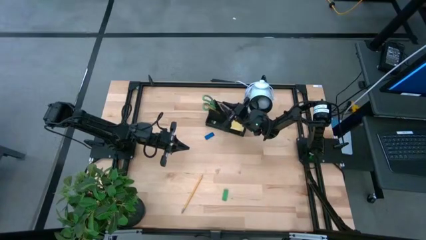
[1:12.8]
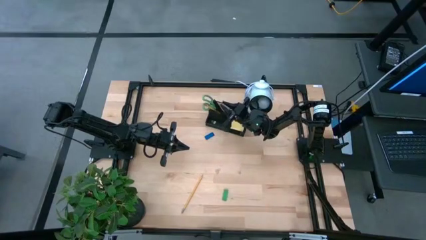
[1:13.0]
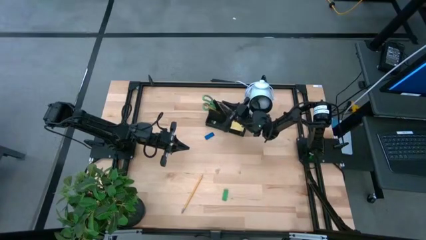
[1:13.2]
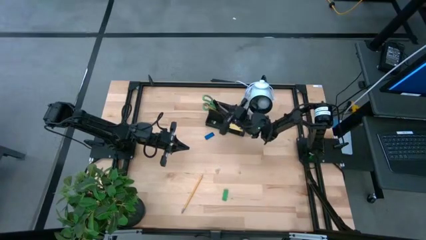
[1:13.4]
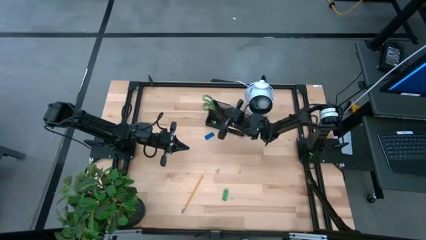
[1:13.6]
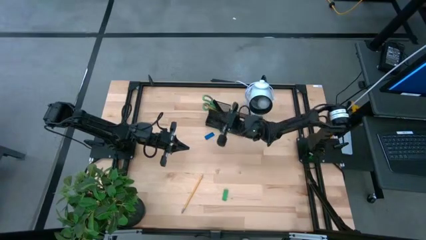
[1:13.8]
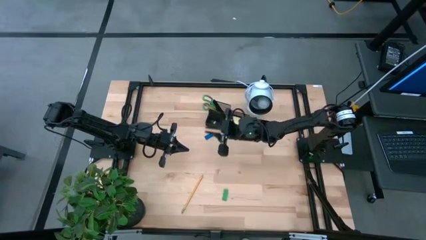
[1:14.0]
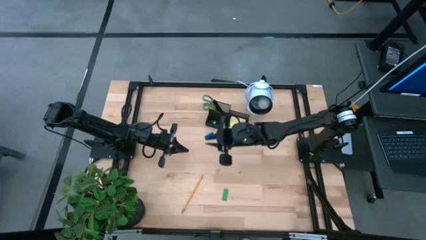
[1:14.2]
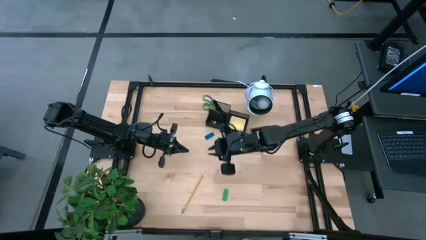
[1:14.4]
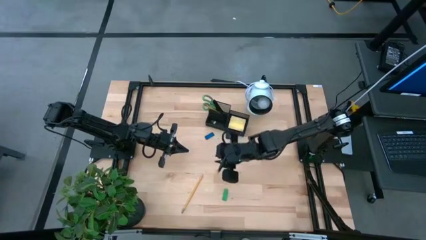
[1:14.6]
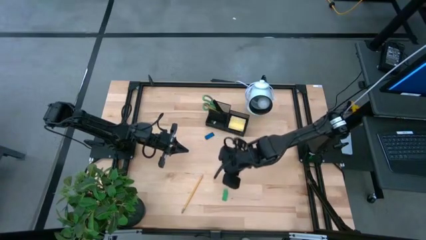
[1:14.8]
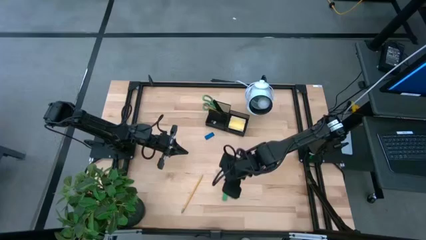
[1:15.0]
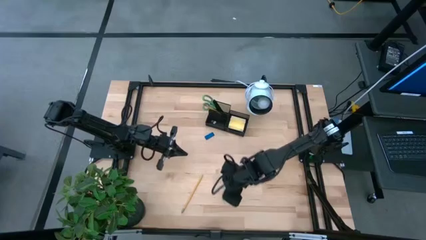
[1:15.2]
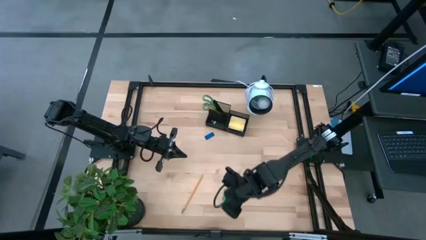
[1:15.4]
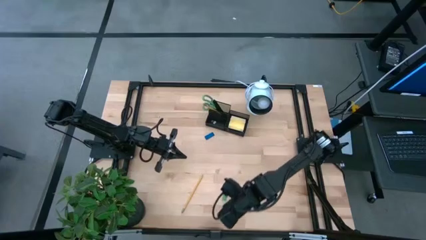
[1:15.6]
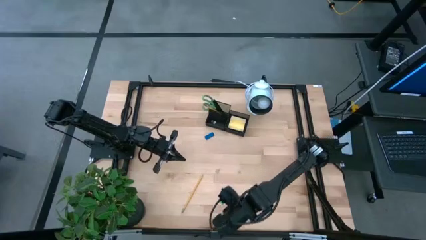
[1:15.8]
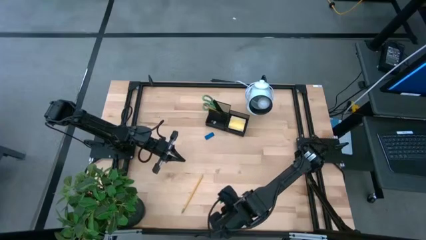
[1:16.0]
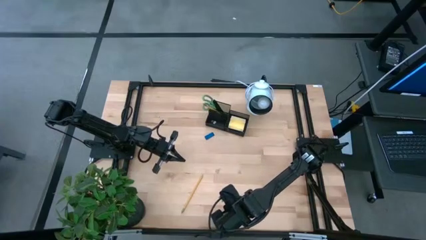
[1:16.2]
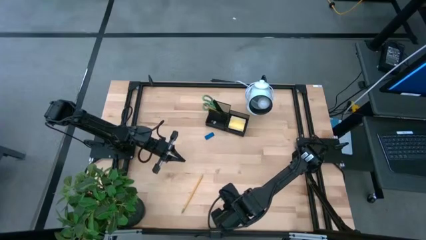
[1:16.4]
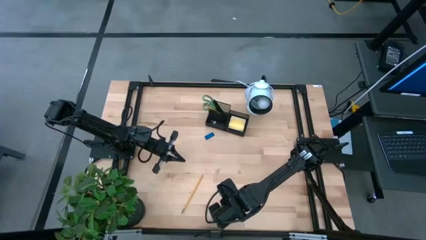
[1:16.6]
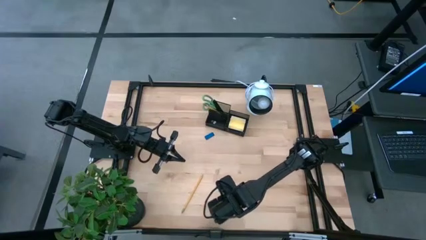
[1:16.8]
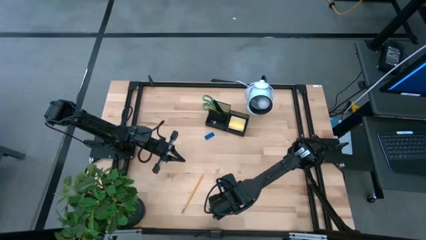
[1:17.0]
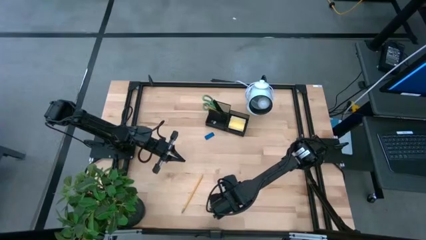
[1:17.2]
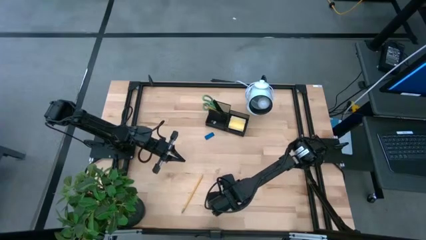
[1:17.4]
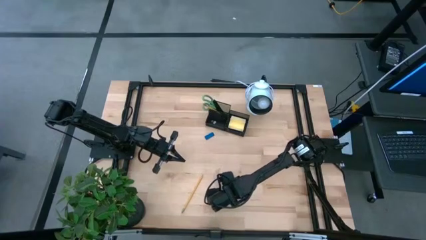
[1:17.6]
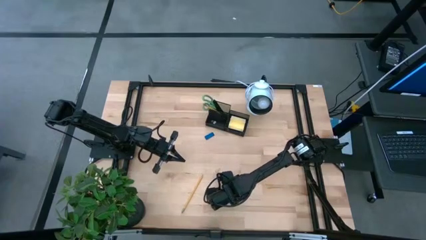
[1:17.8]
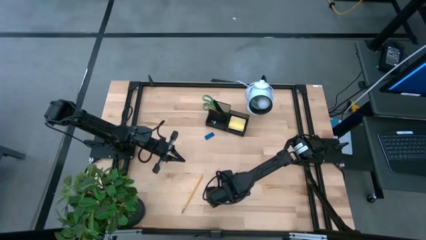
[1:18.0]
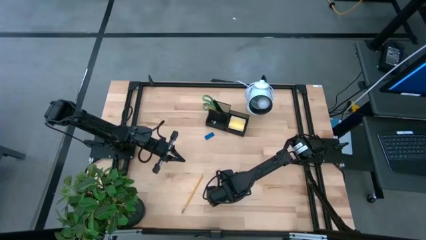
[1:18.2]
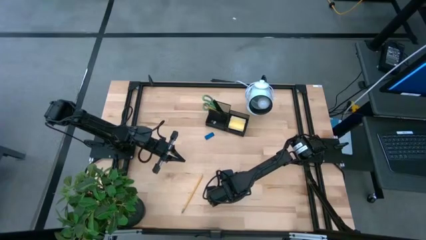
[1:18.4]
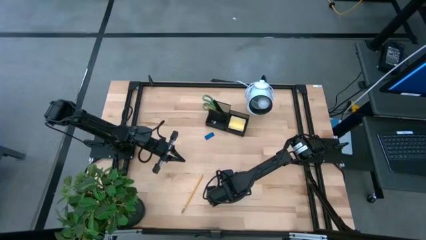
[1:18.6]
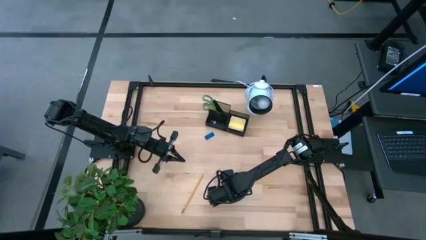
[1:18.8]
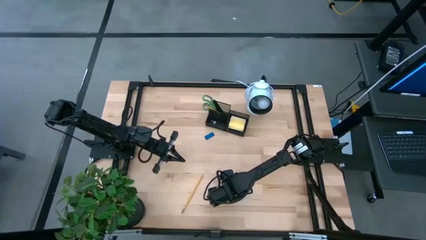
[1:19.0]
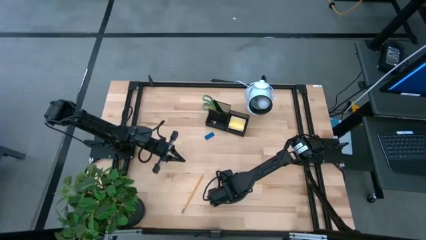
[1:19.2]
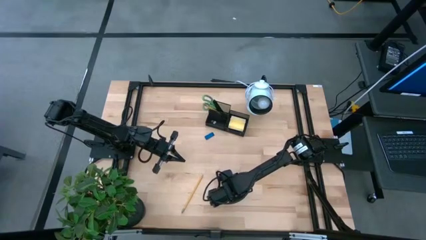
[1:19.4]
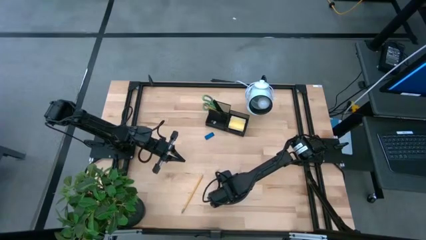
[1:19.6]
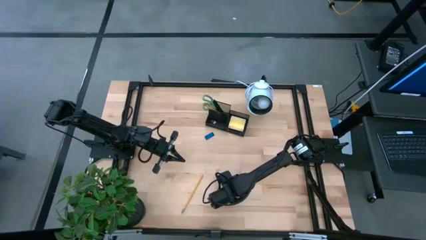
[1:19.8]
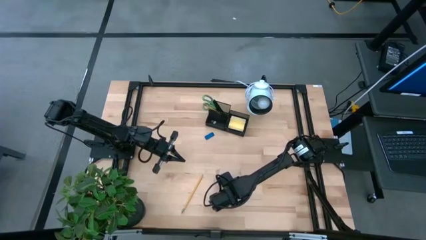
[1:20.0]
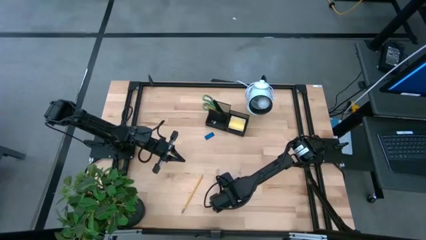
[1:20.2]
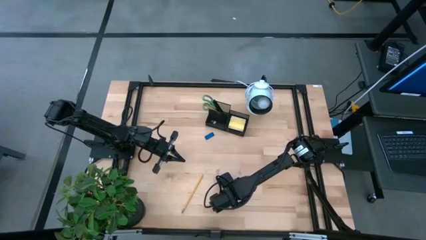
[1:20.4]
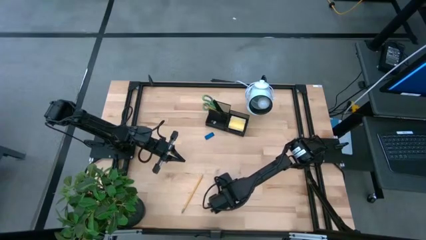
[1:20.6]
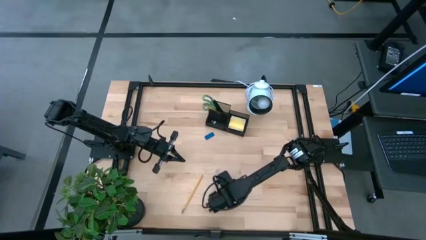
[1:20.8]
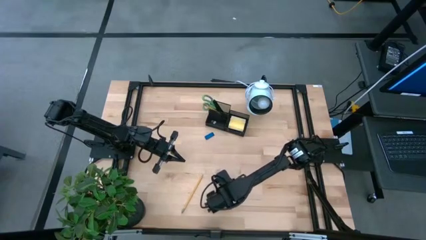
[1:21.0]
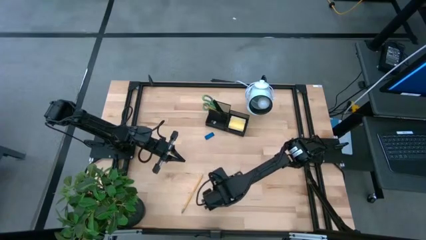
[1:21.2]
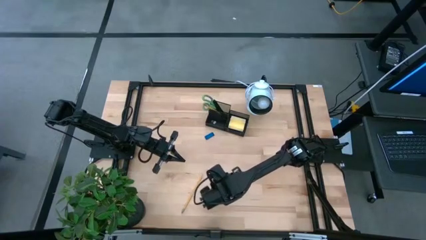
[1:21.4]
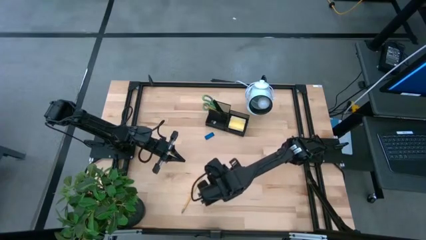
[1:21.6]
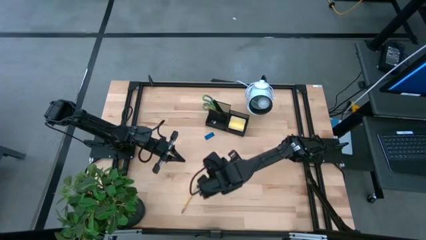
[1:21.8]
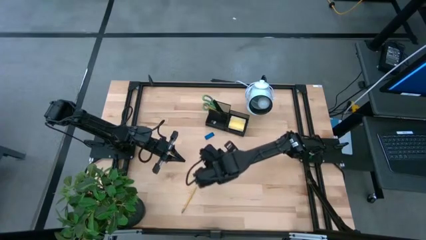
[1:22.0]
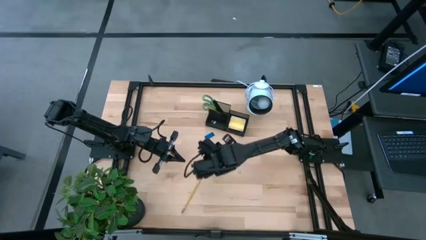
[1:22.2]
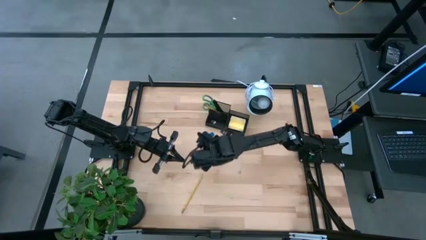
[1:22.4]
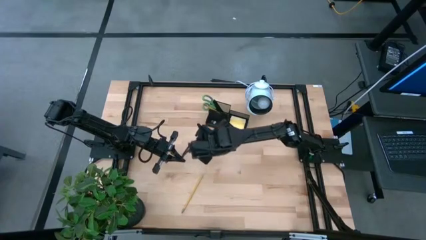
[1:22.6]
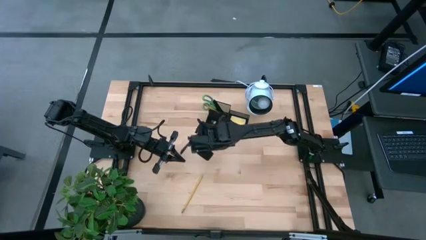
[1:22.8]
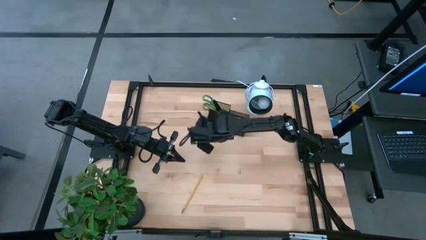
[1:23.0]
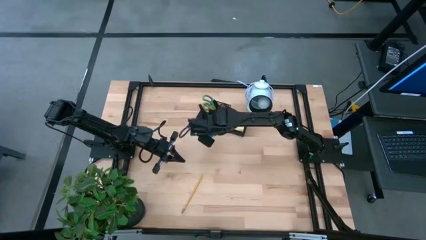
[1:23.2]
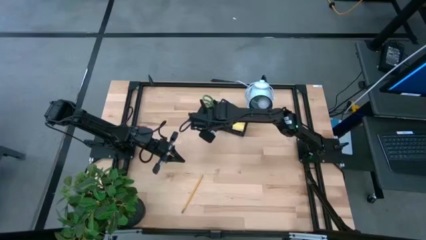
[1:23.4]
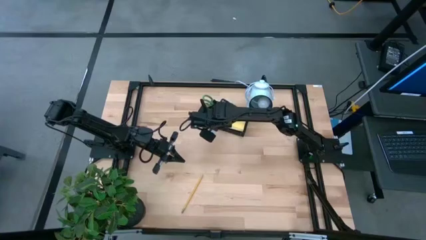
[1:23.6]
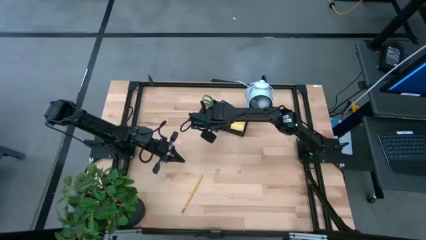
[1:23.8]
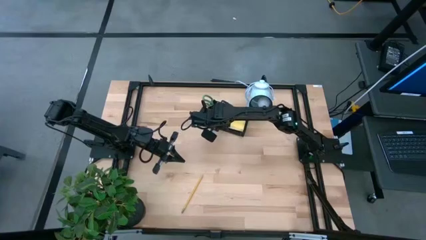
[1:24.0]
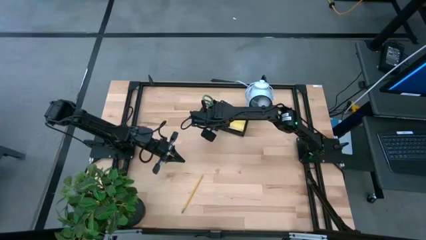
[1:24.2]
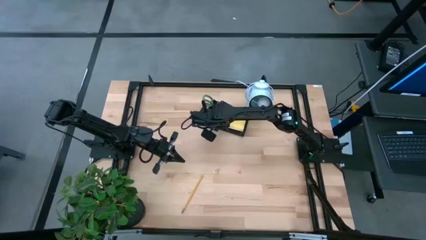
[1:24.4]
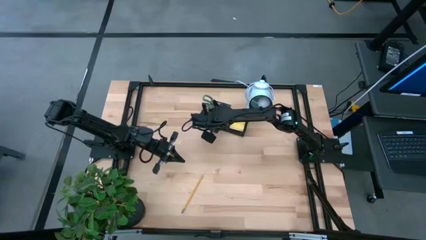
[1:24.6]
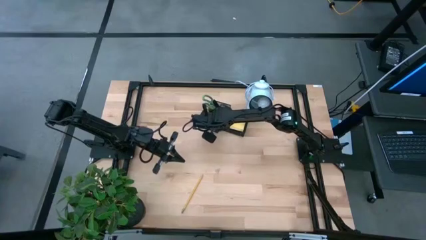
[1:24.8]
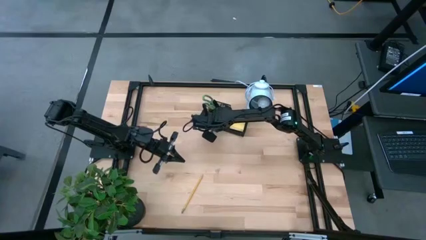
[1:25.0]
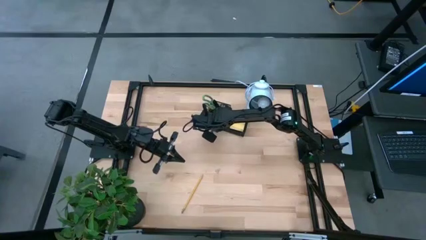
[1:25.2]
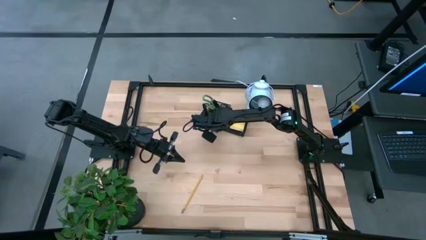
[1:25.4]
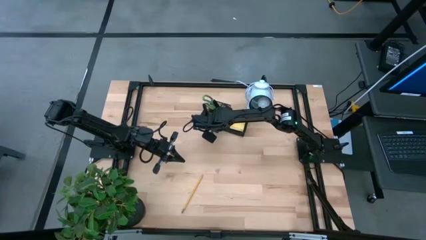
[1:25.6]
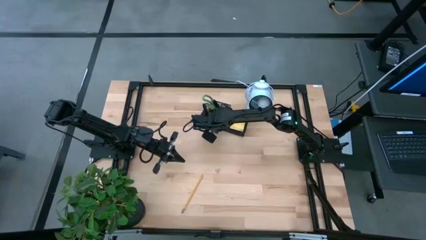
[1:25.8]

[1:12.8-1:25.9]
Task: Pick and place office supplies into organizer
Put the green eraser into the black desk organizer

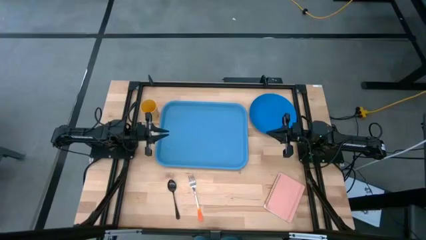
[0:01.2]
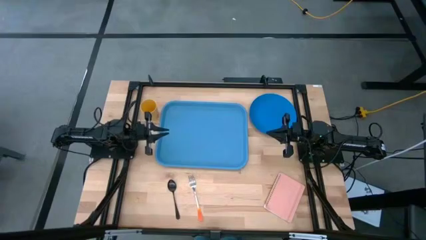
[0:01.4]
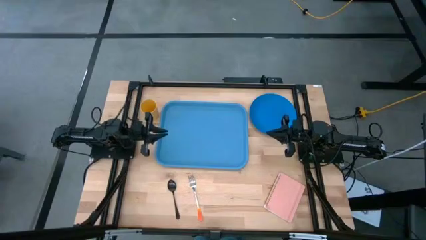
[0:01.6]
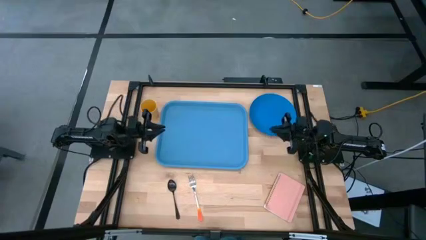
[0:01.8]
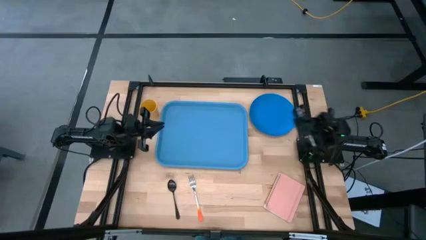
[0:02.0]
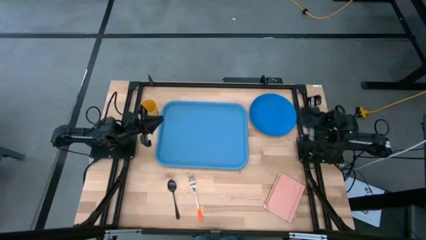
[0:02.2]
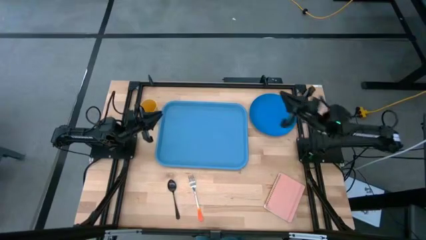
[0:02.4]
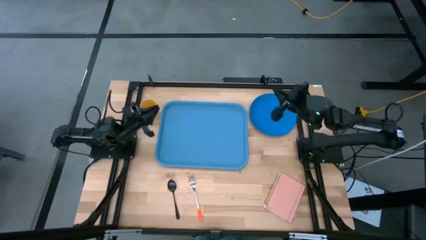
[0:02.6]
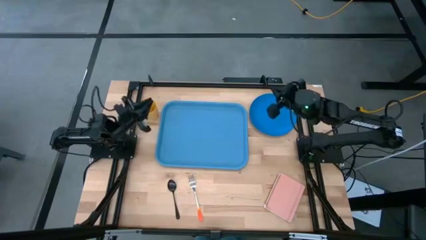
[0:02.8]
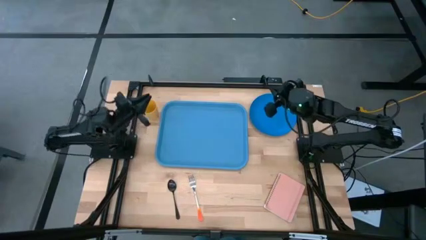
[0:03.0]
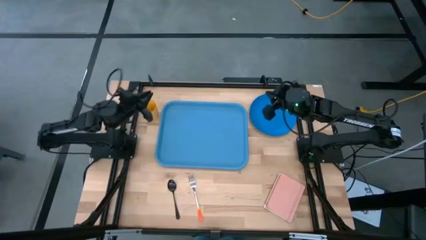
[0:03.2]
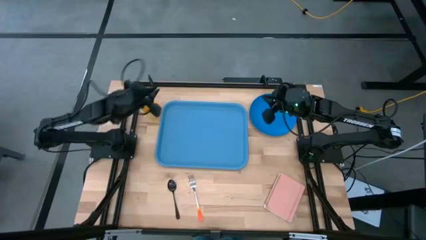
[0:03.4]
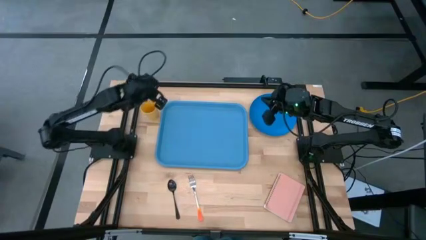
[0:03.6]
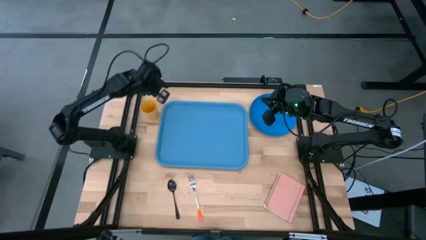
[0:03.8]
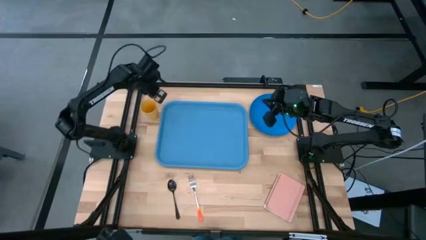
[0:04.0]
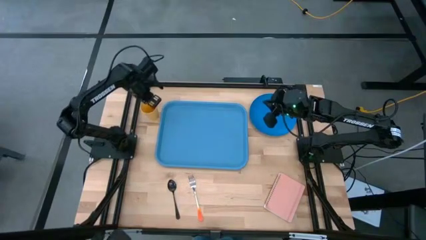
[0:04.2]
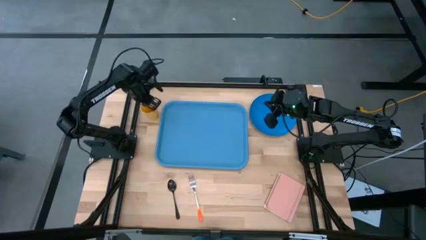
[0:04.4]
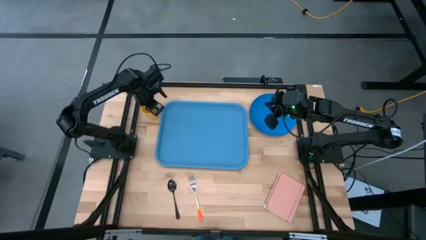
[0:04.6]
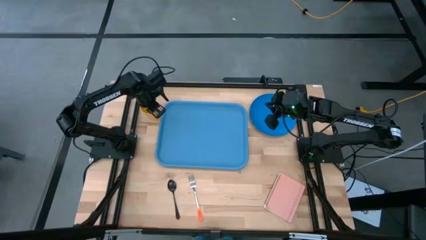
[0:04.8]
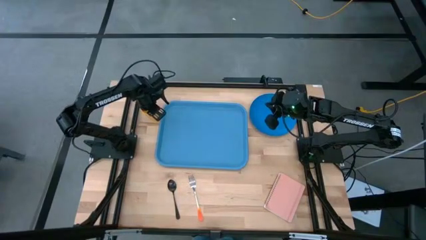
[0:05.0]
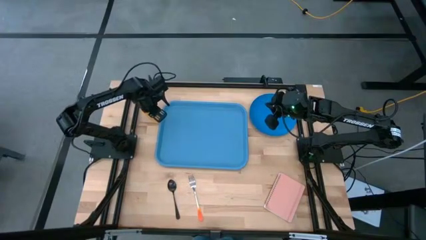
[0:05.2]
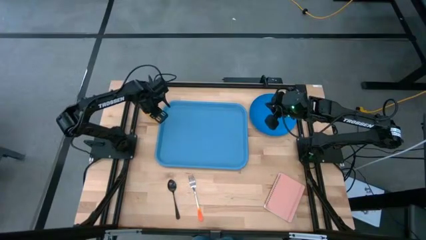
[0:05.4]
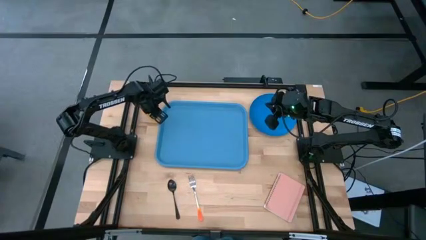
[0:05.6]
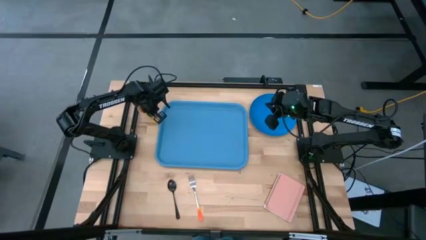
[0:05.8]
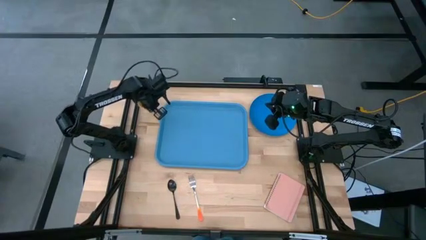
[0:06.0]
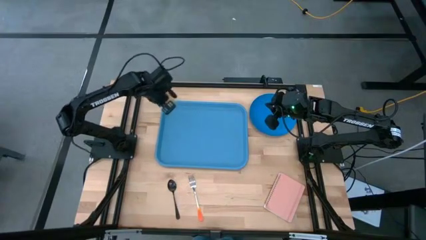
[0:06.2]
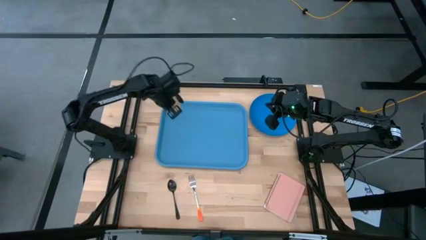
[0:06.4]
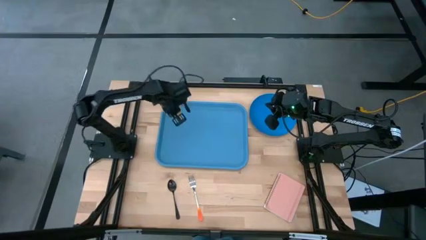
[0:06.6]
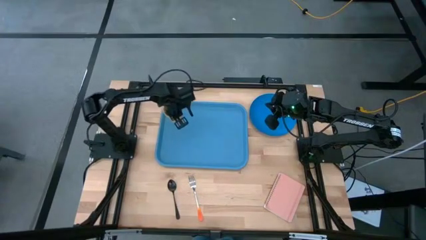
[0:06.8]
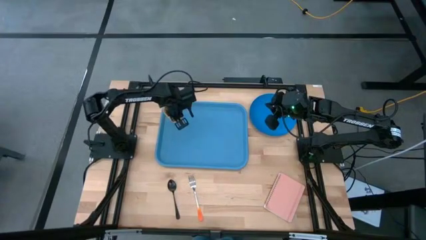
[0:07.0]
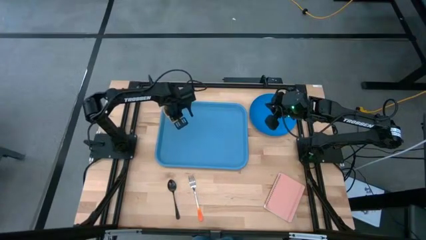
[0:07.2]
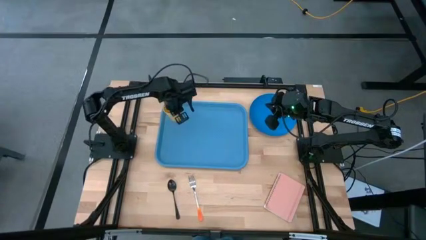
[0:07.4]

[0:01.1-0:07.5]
Task: Pick and place plate/cup/fork/spoon on tray
Put the yellow cup on the light blue tray
